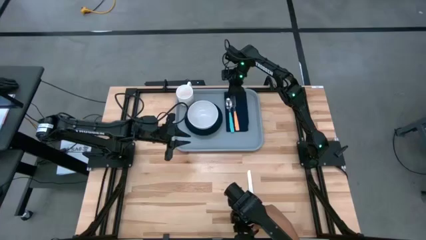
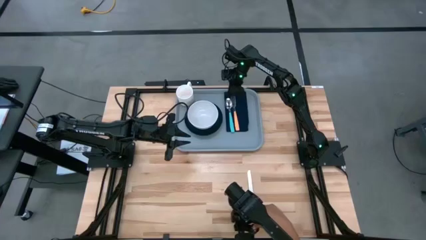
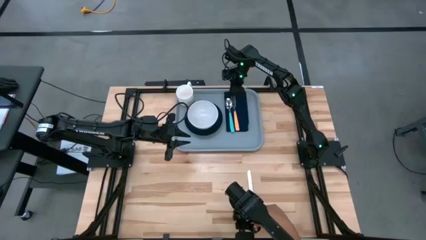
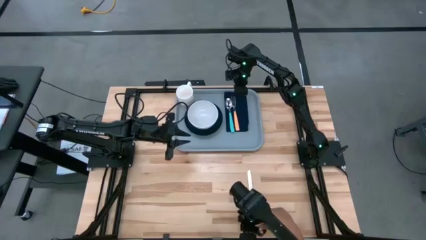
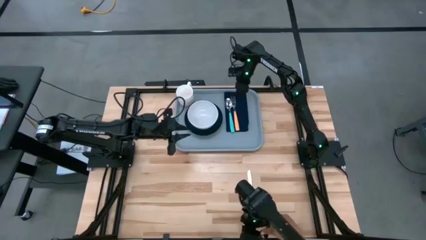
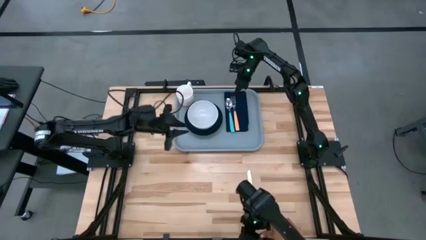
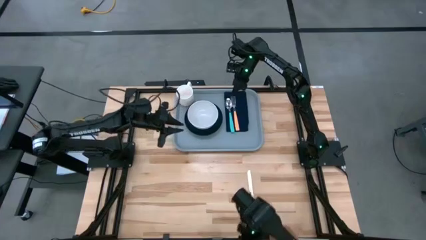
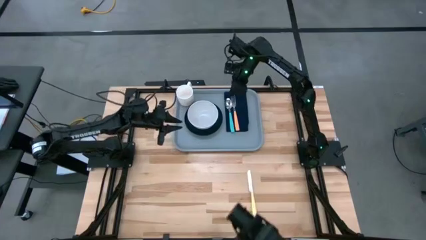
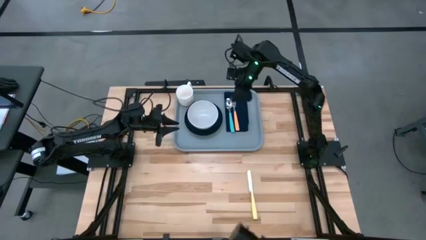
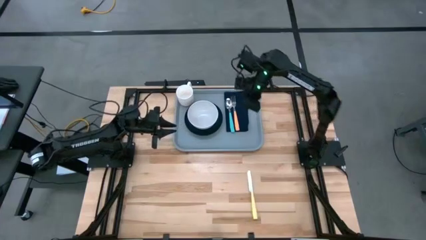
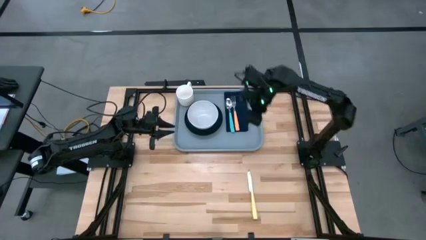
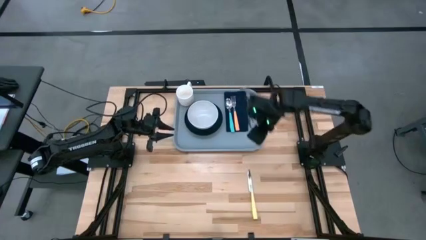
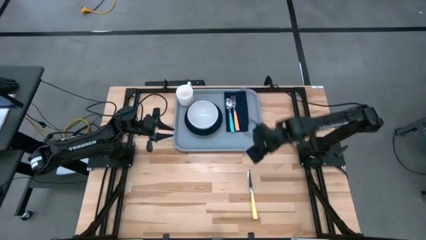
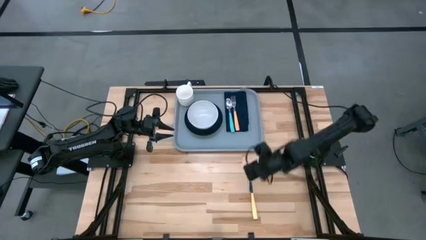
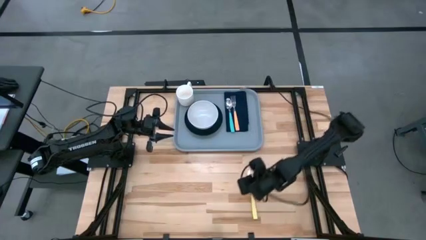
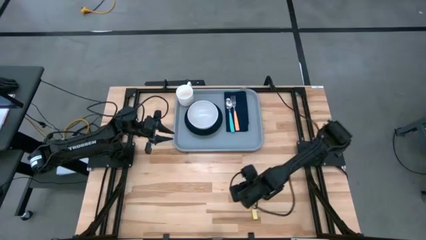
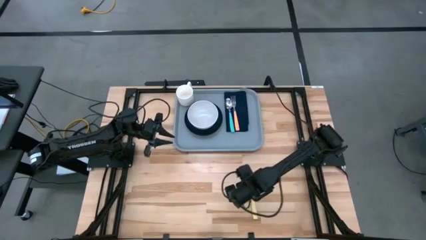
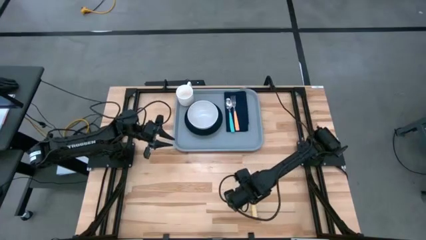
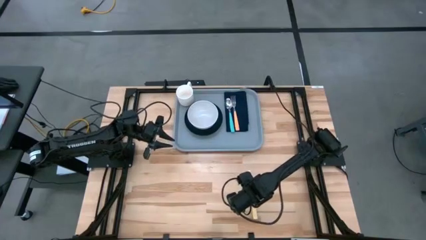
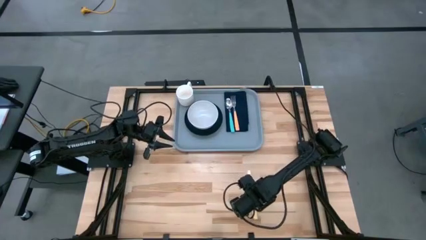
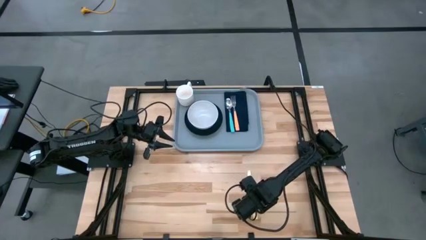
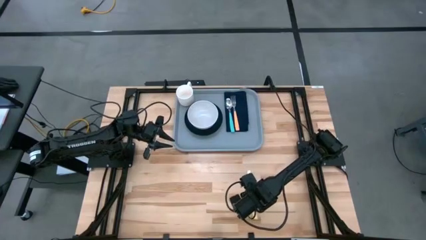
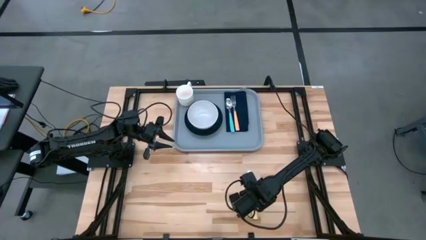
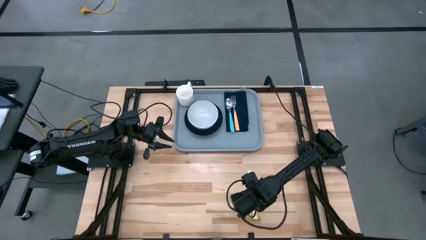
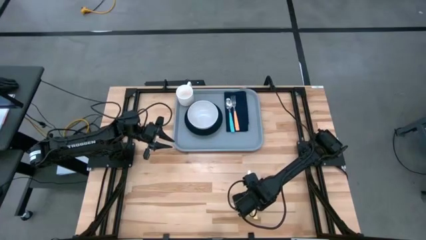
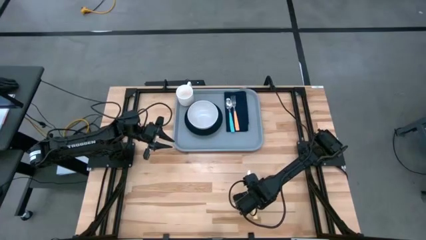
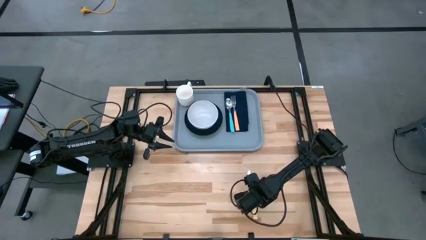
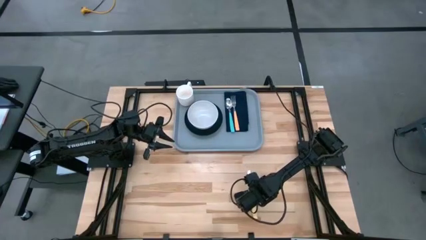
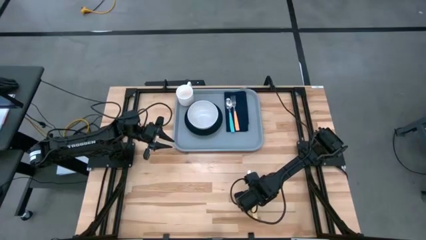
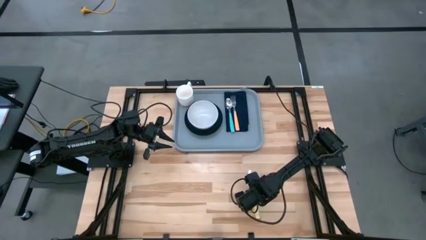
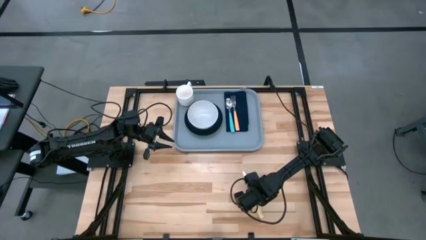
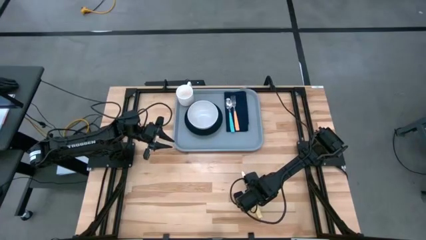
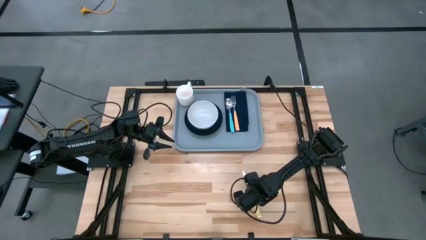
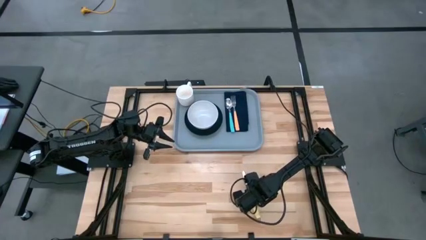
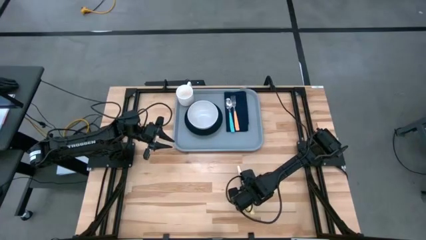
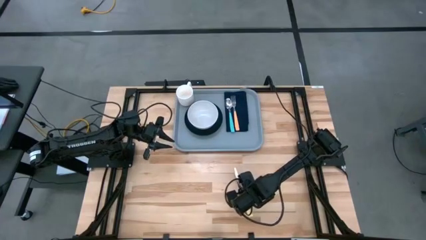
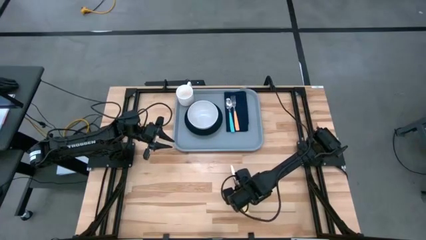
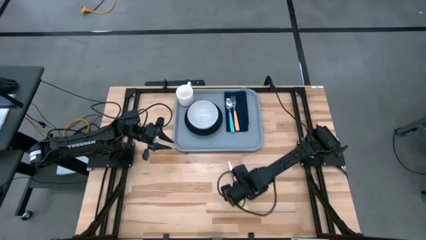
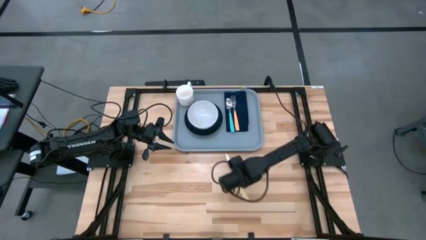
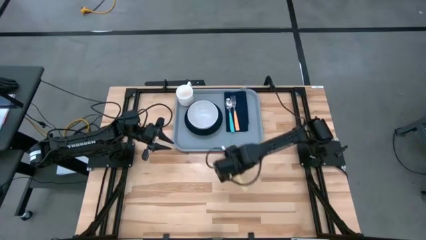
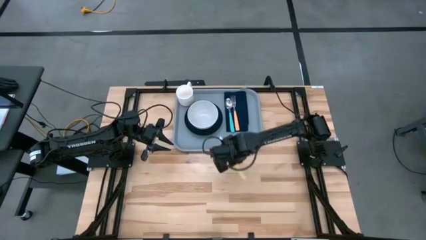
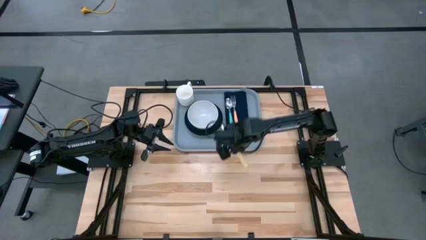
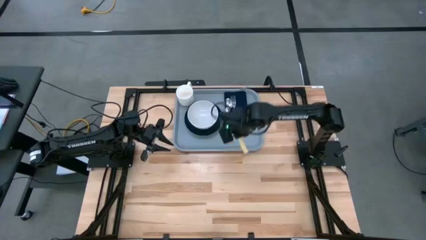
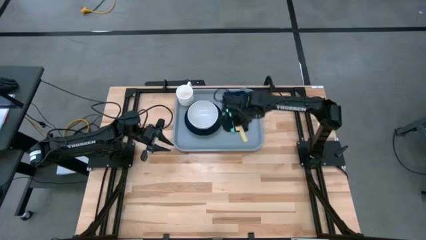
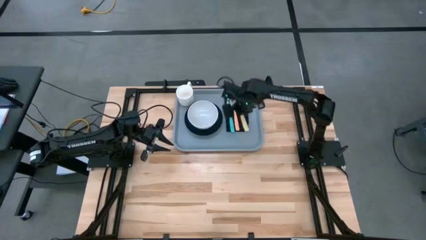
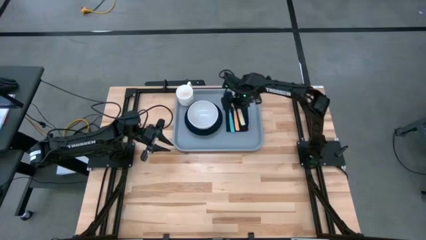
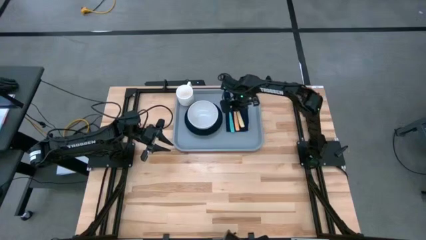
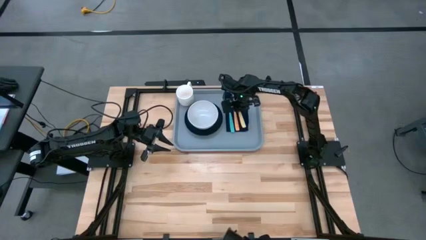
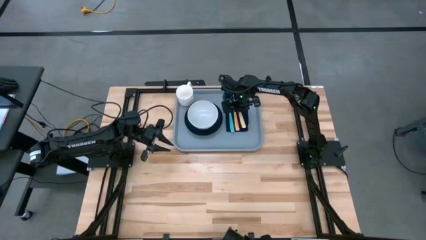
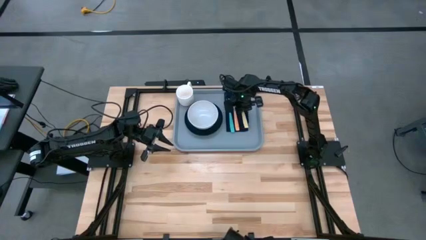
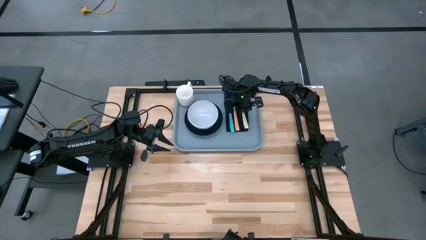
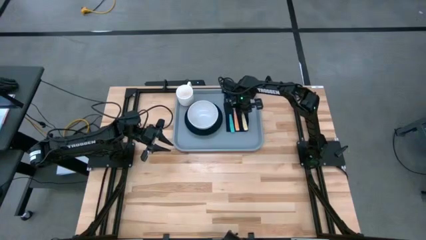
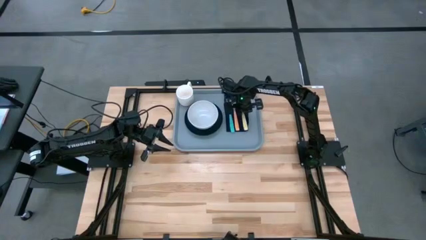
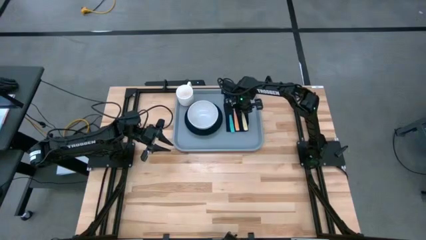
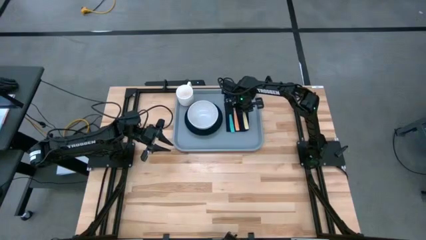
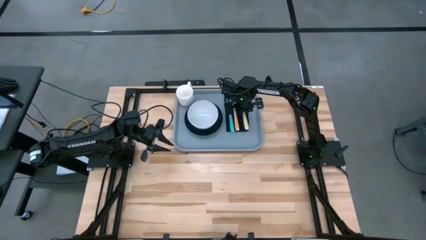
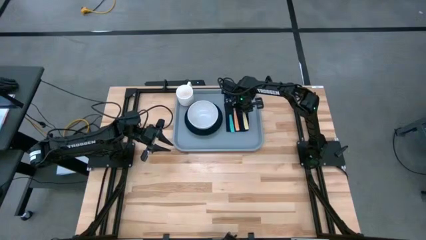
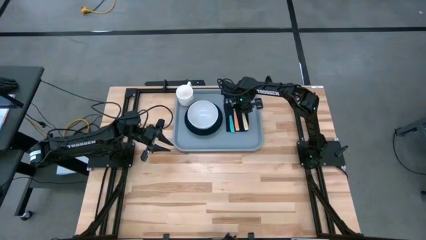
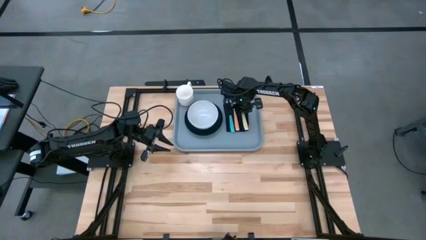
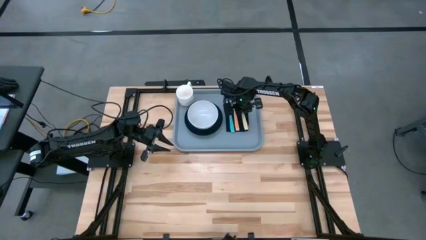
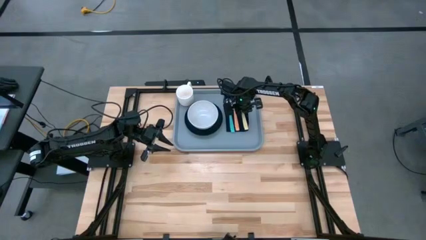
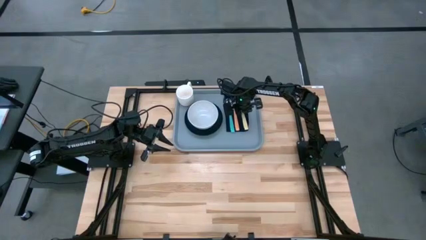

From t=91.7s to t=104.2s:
Task: Set up tray
Put the yellow knife on the blue napkin to the right of the orange spoon
